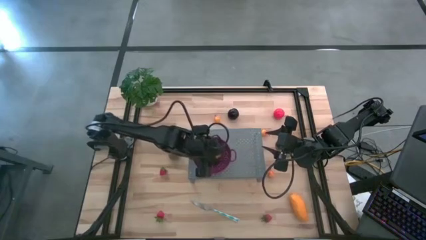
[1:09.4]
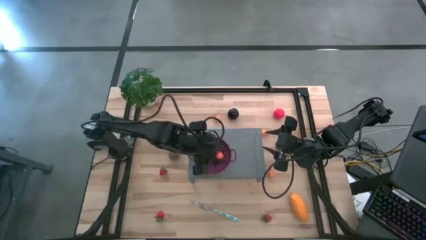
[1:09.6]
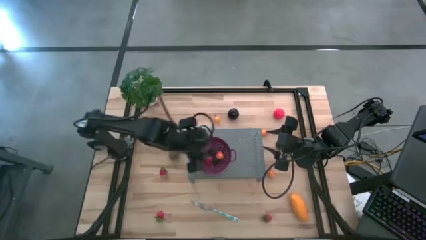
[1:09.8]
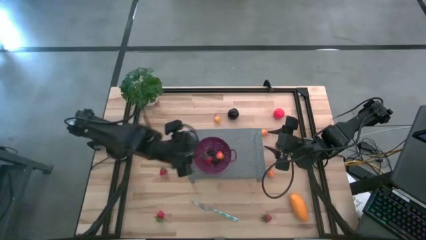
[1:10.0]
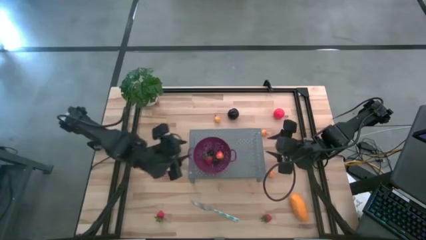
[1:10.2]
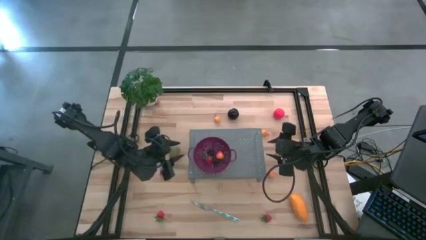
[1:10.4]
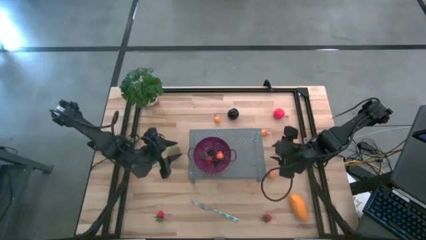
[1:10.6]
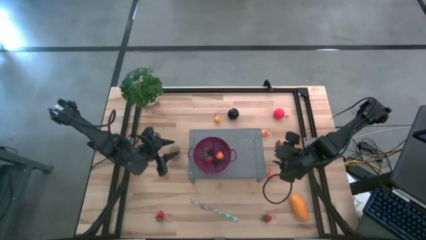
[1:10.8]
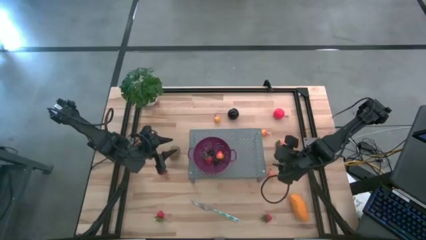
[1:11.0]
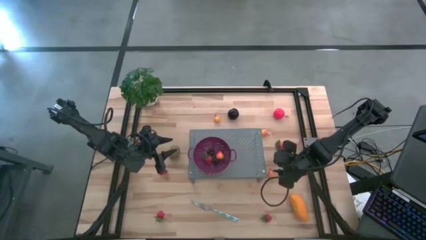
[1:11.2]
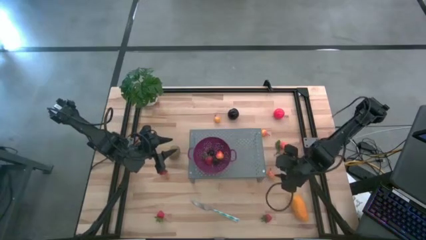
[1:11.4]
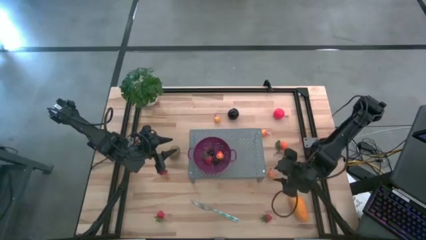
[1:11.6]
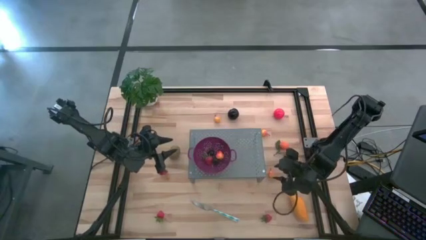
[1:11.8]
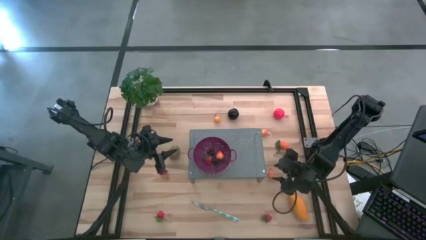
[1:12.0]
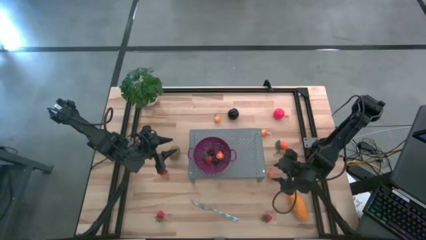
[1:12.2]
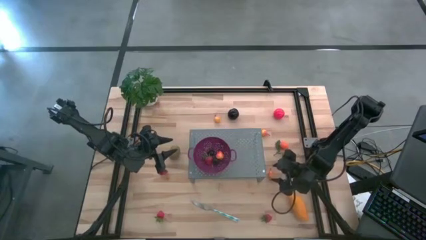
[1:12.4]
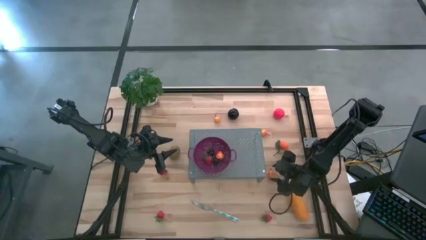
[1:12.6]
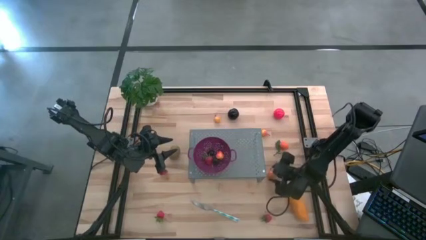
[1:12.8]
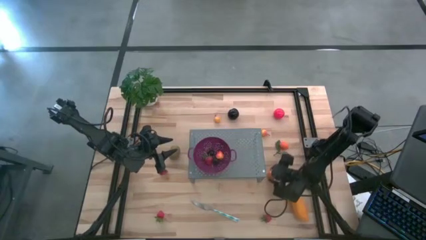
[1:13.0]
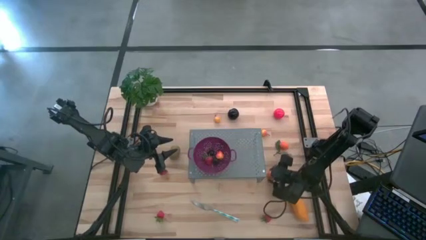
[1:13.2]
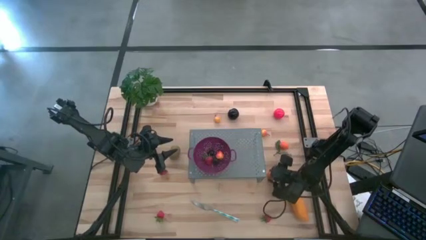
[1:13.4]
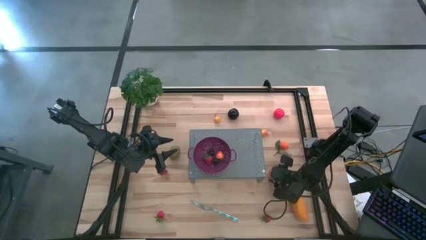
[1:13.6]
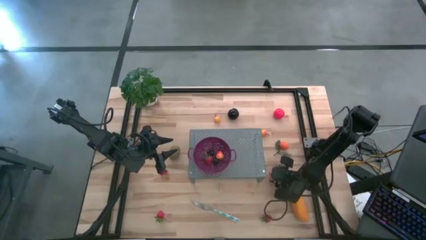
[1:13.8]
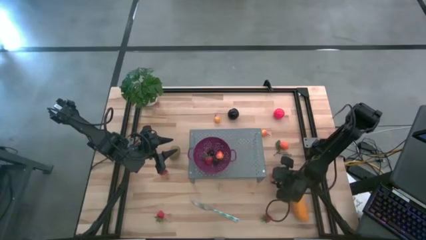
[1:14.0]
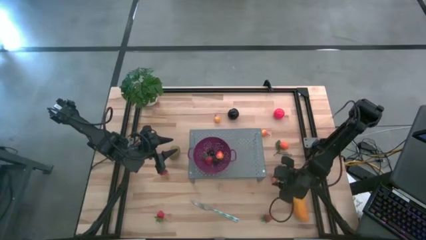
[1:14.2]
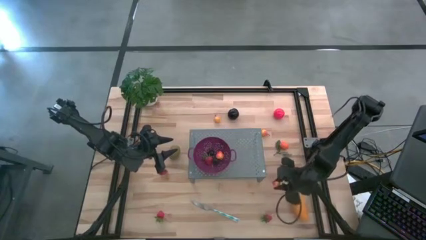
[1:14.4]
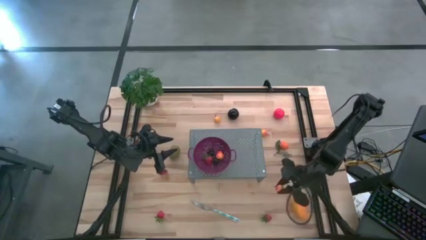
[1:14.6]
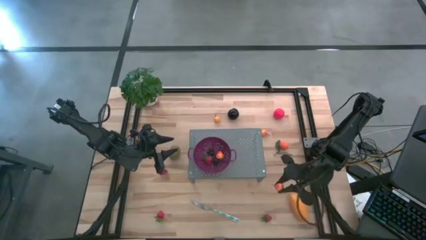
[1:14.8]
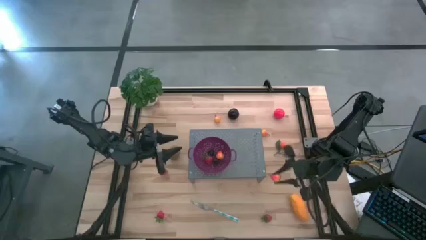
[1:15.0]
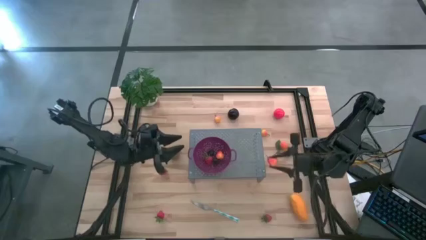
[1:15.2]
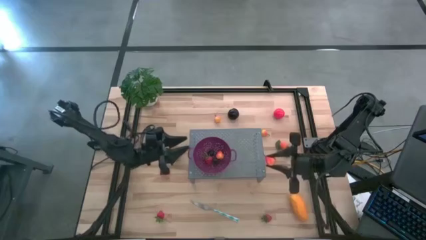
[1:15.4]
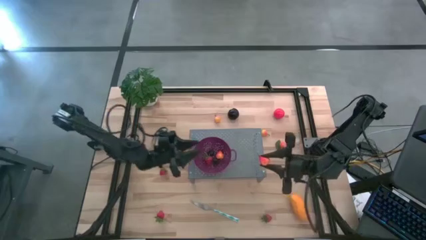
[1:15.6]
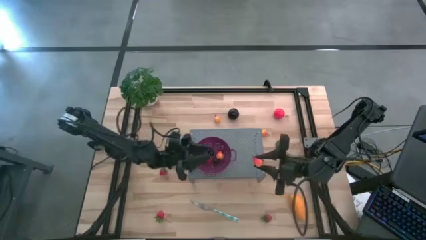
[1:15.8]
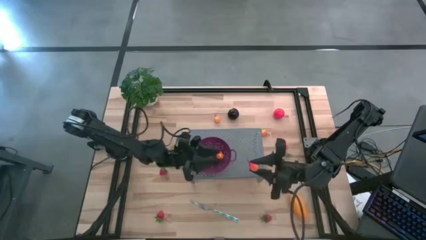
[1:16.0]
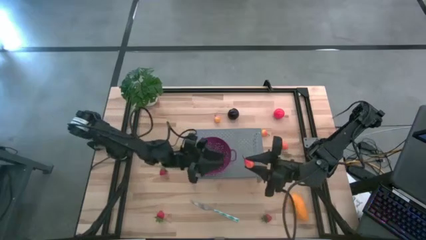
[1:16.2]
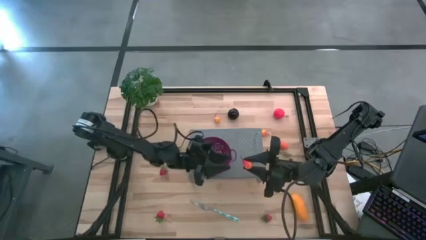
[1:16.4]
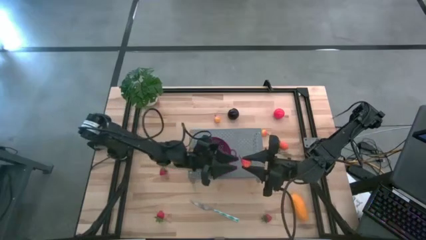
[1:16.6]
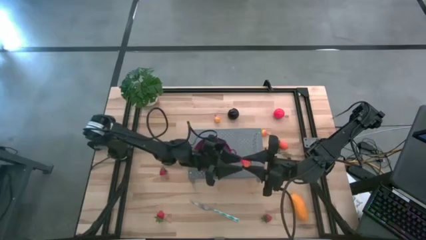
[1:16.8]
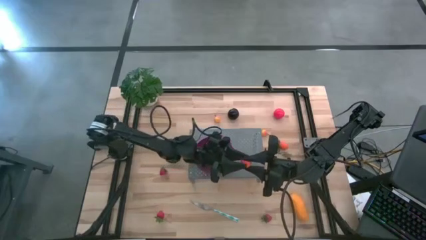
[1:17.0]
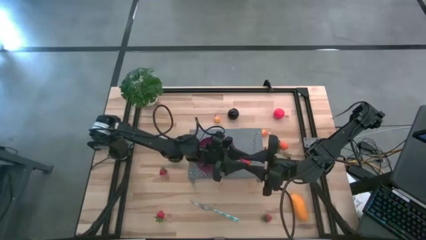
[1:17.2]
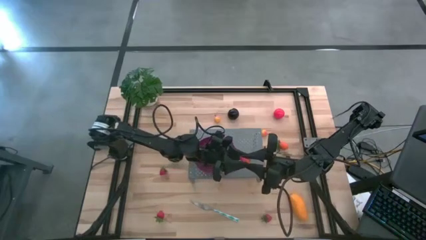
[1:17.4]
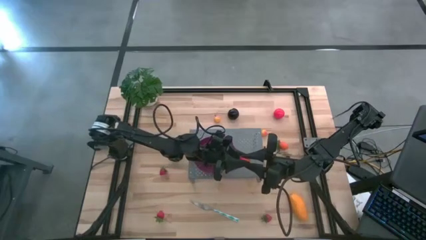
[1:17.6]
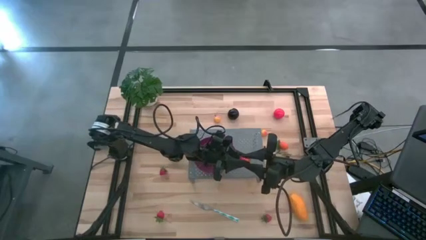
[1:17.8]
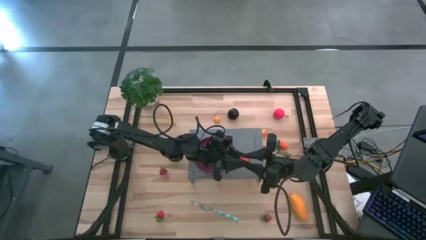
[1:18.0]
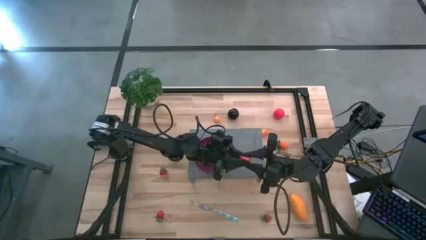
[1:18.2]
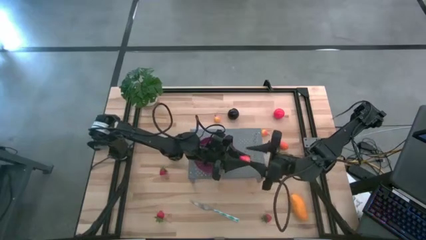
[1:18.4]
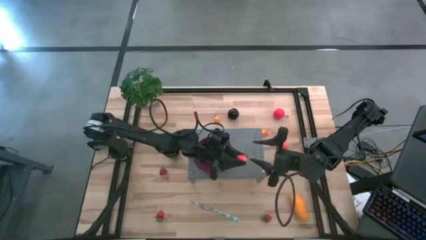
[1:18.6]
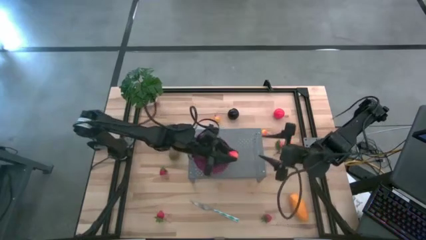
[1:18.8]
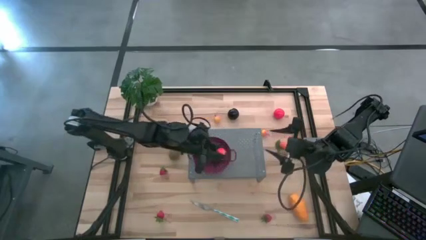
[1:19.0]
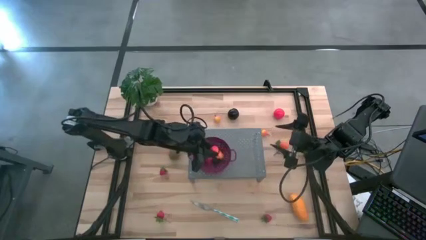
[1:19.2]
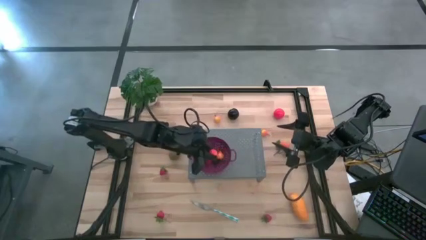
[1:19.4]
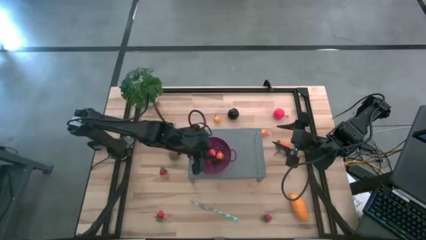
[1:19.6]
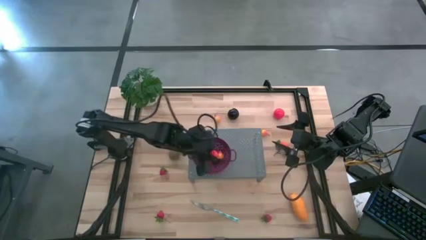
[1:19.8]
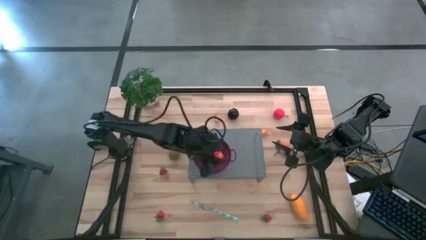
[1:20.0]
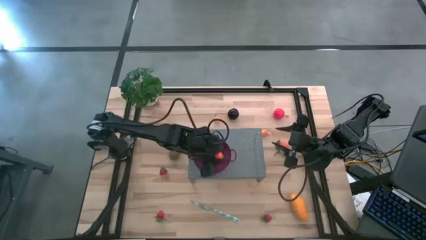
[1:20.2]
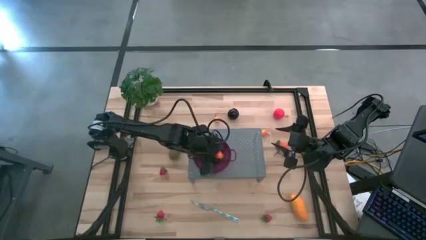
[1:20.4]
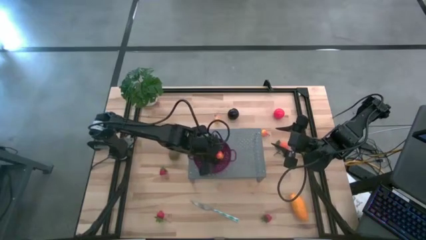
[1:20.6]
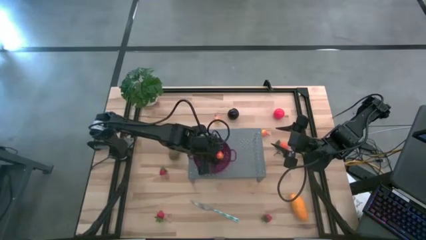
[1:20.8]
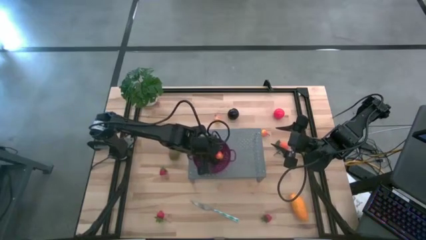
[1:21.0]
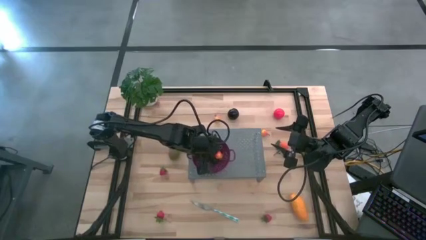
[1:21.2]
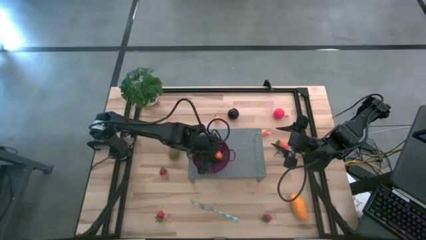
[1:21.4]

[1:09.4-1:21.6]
Task: Pick & Place Fruit
Put the pear into the purple strainer bowl

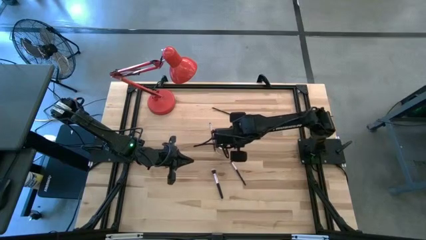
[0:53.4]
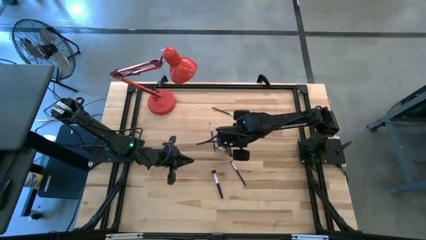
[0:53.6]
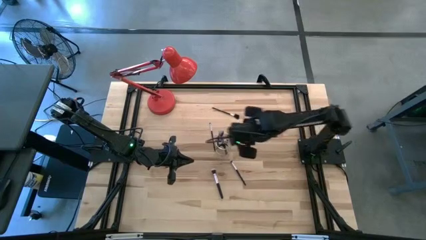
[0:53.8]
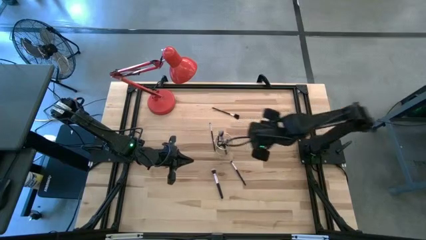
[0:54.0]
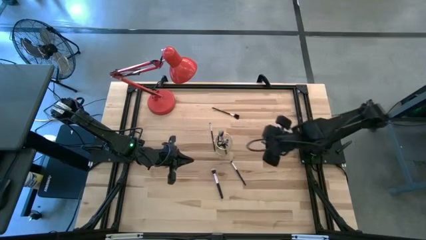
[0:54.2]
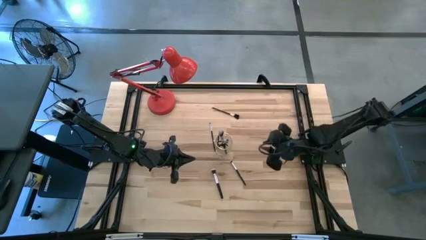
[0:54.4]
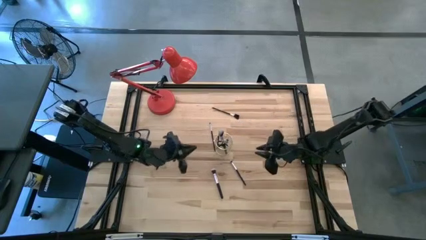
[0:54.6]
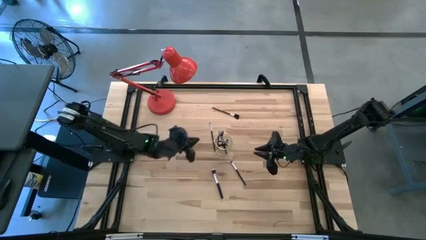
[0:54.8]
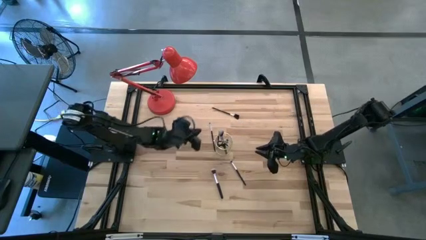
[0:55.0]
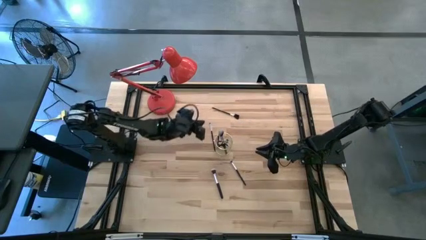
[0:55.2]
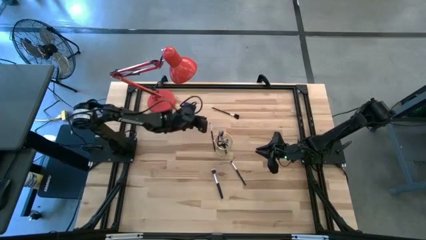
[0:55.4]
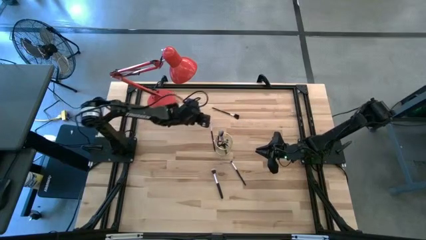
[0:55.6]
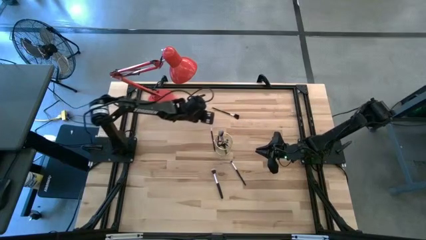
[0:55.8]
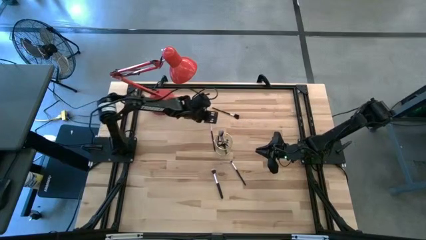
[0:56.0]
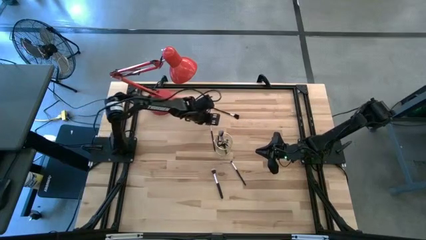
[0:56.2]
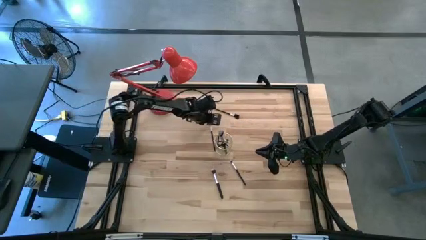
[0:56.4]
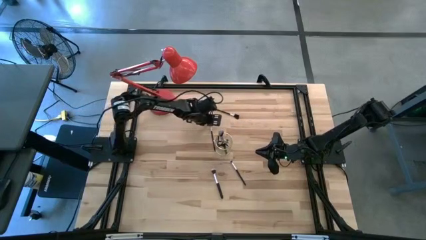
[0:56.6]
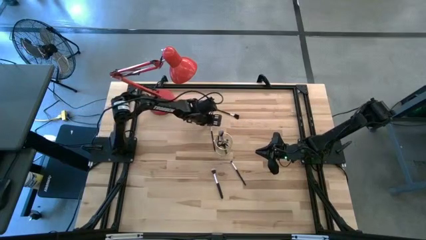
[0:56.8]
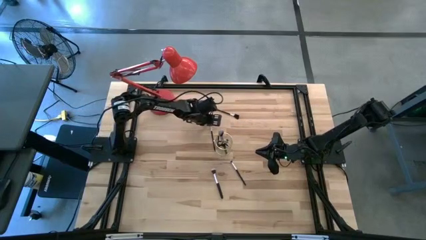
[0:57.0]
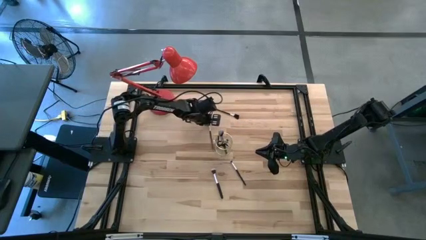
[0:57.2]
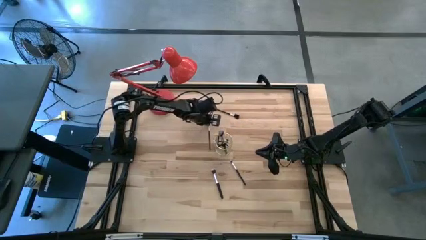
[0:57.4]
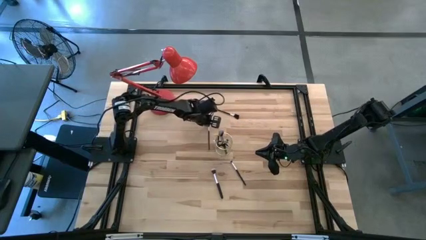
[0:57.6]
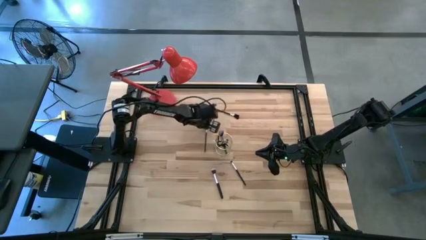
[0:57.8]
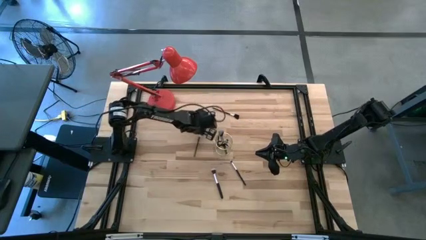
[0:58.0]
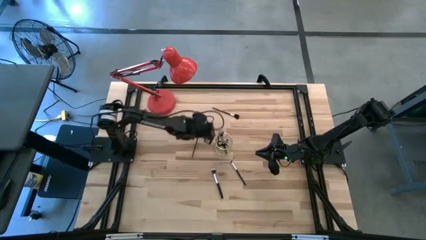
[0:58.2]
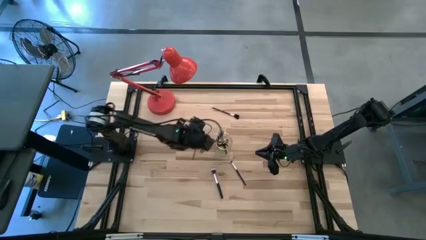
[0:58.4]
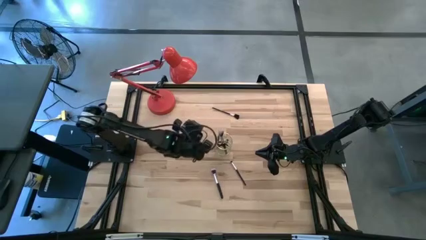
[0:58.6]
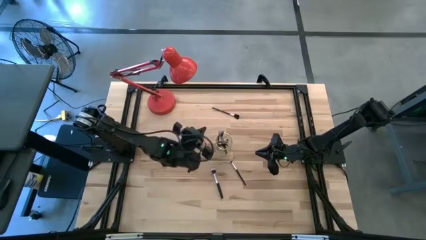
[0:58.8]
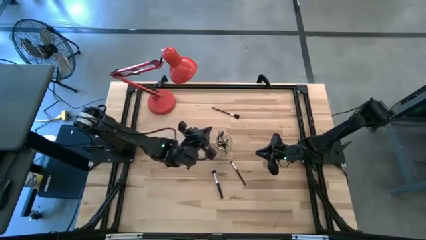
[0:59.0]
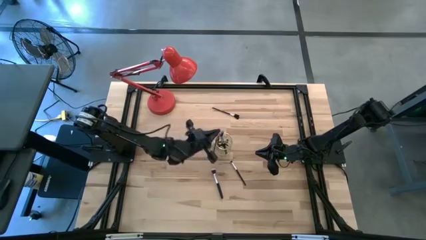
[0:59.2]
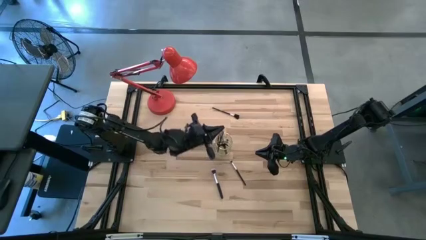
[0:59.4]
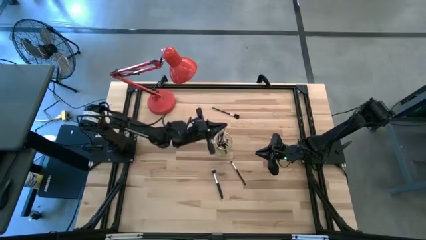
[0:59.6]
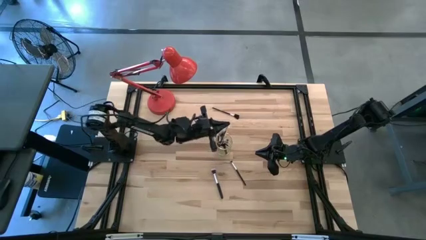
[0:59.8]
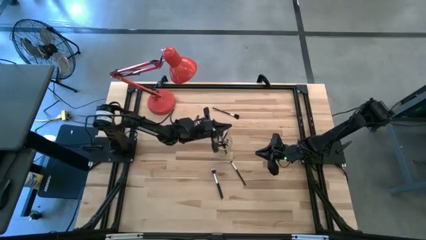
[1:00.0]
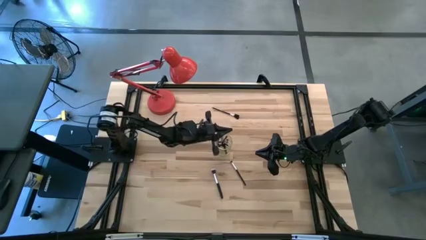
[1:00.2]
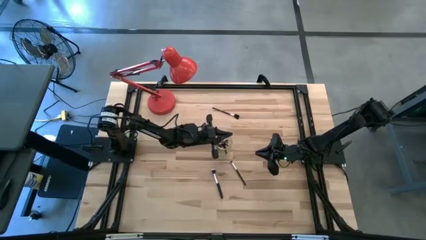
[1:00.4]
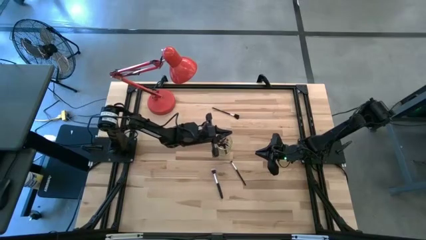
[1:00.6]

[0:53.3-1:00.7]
Task: Put items in baskets/containers
Put the eyeshadow brush into the wire organizer
